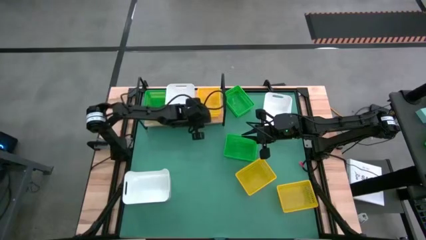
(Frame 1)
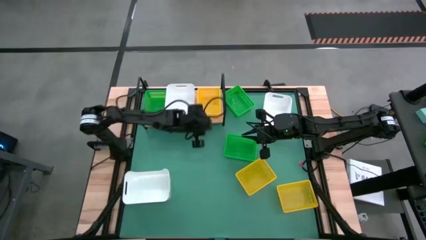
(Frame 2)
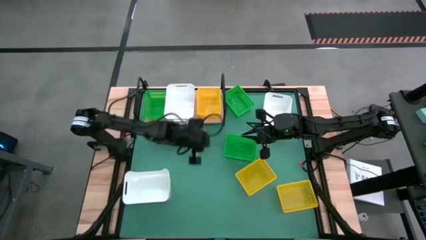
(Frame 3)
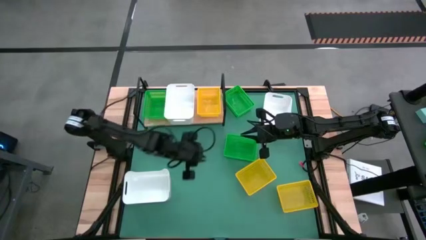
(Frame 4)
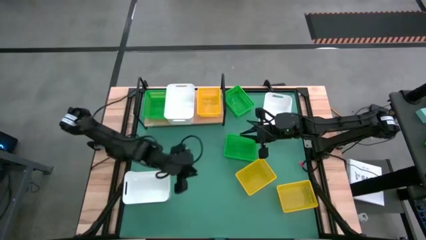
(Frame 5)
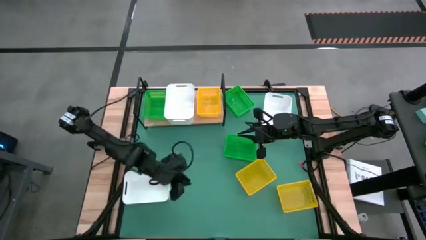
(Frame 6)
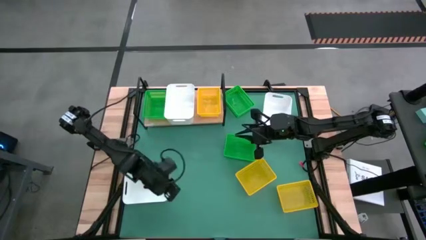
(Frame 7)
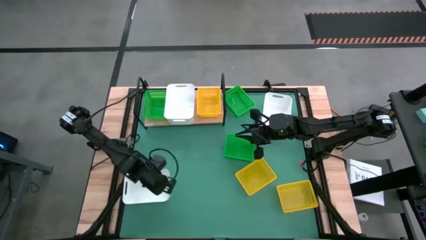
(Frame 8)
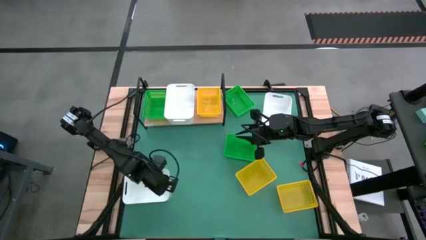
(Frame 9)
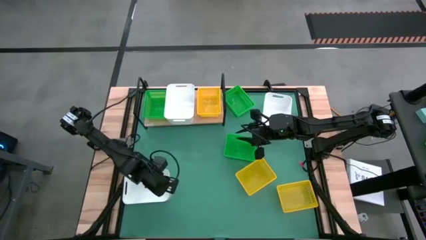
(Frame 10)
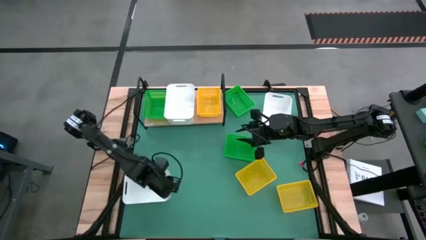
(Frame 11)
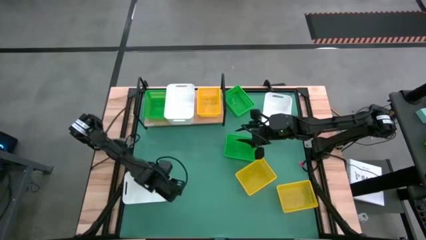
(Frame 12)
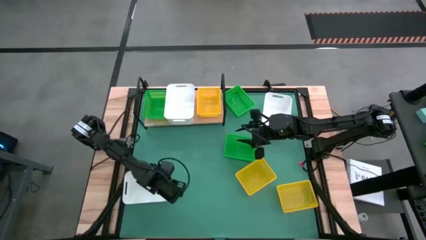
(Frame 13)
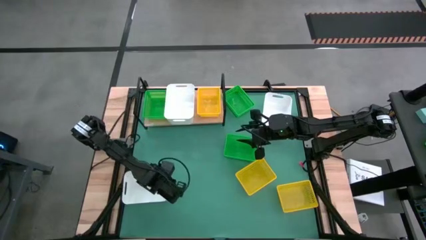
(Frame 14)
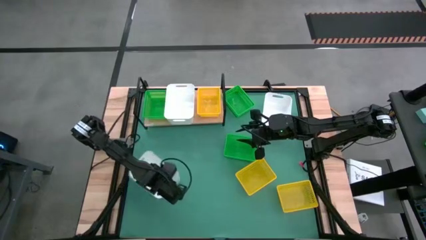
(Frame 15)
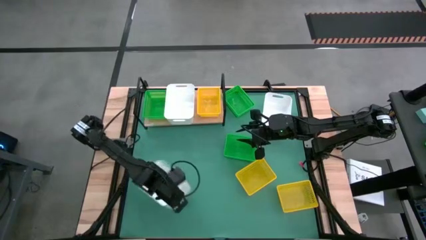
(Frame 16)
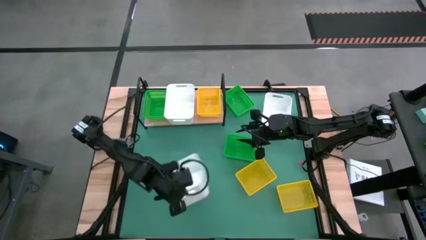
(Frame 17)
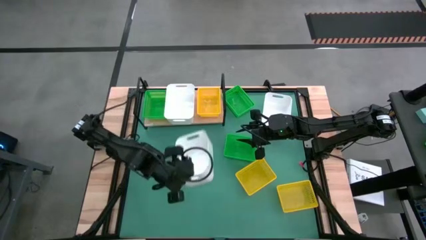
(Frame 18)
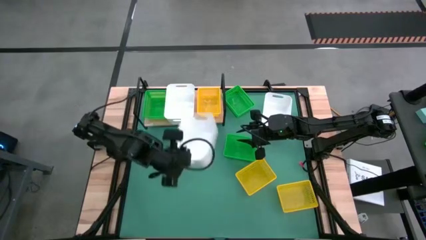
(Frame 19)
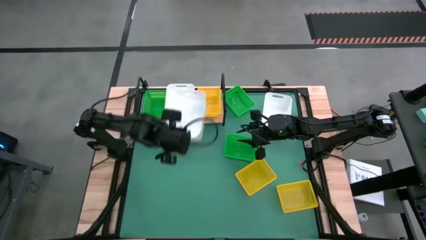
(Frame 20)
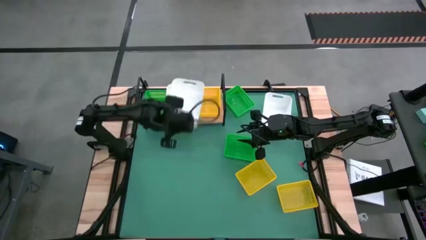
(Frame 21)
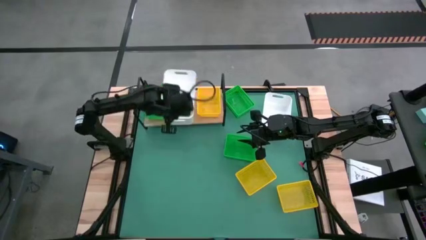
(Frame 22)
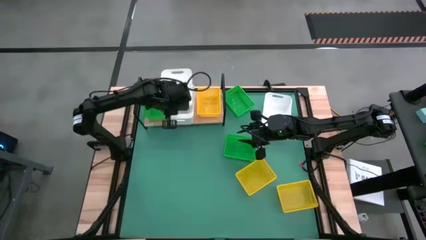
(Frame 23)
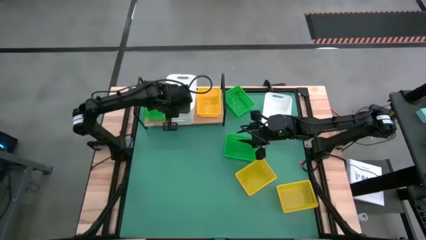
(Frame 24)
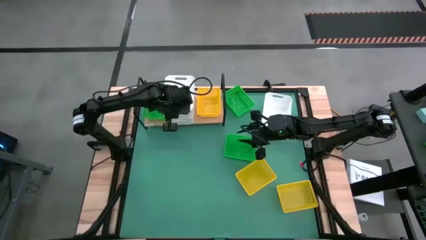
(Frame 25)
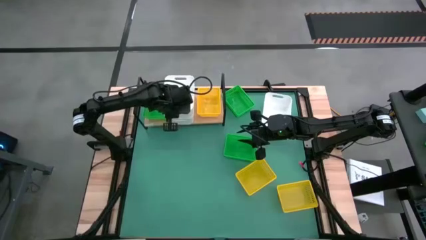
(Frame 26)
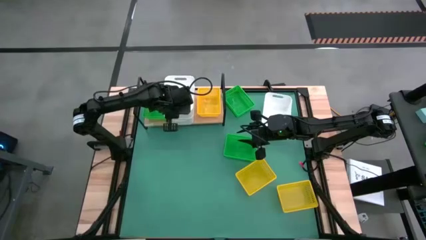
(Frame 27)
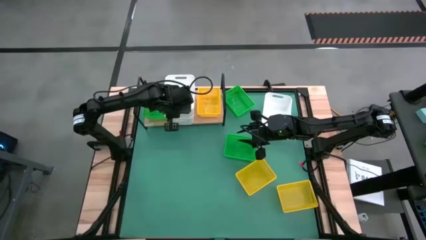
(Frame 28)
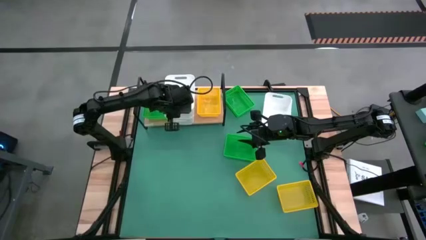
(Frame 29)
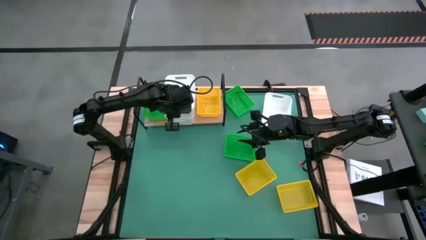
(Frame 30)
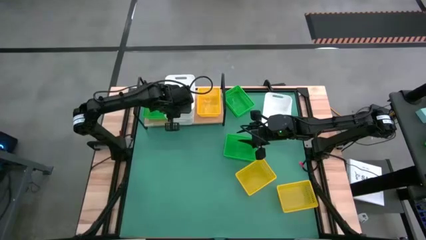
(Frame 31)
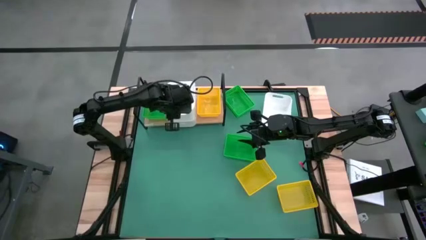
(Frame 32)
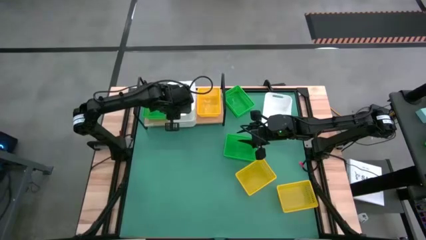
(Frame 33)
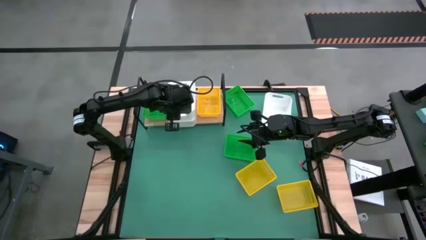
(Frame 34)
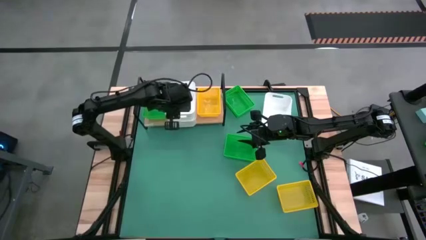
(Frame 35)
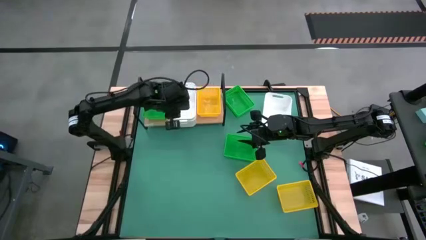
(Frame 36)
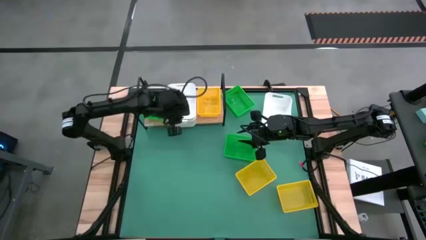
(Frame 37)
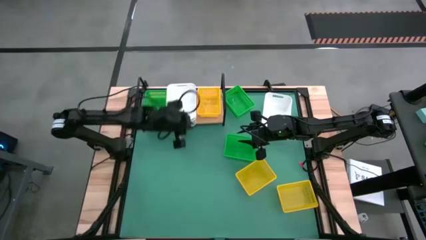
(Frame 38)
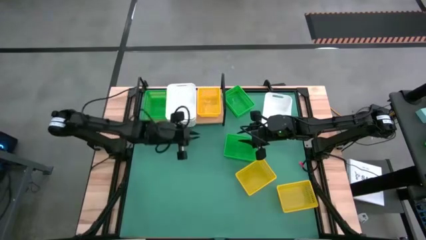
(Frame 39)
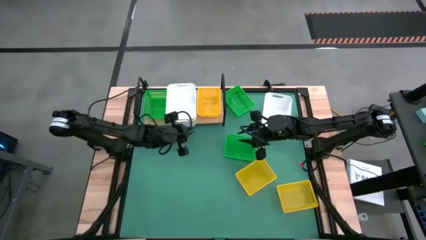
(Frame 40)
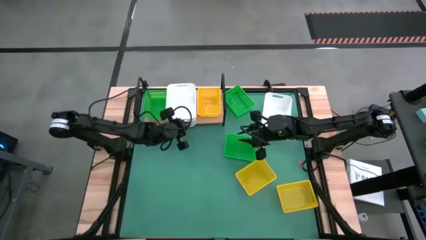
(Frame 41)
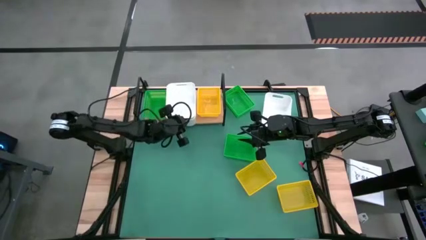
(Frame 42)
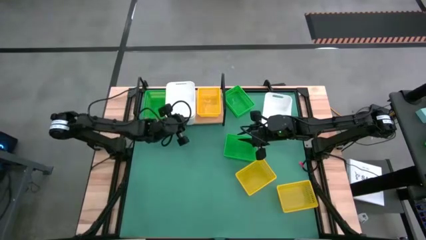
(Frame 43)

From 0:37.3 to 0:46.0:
Task: Stack baskets on shelf by color
Stack the bottom white bin on top of the white bin on the shelf

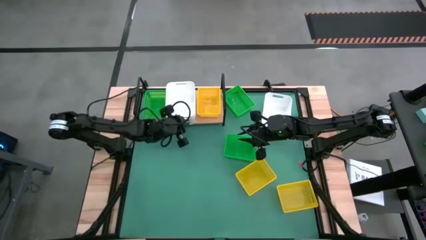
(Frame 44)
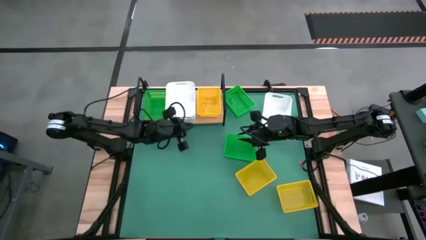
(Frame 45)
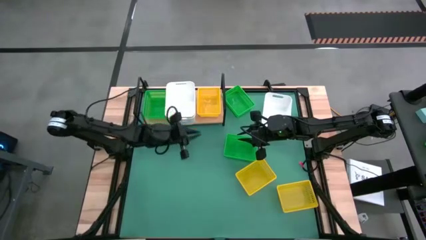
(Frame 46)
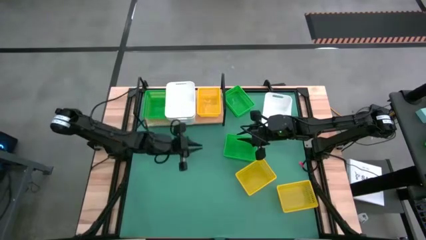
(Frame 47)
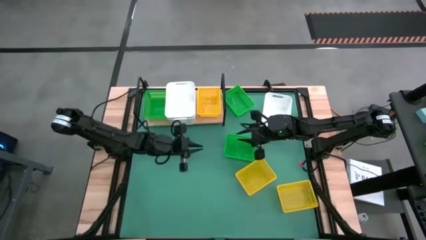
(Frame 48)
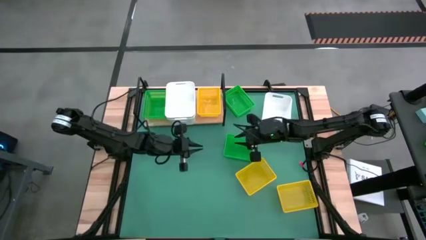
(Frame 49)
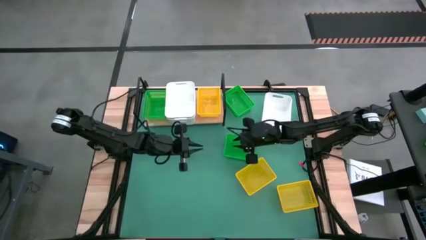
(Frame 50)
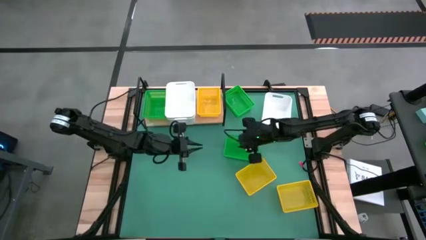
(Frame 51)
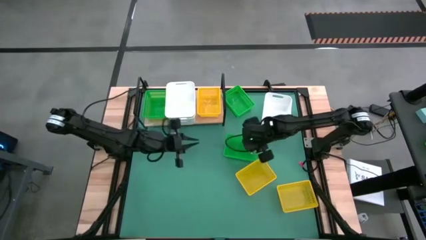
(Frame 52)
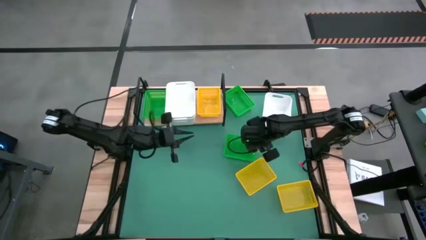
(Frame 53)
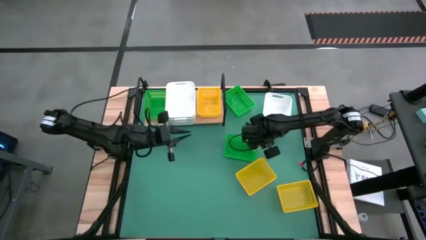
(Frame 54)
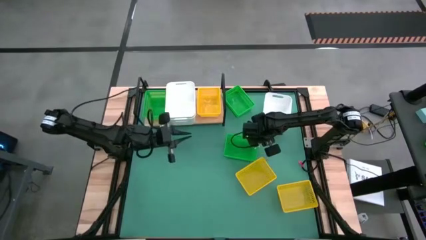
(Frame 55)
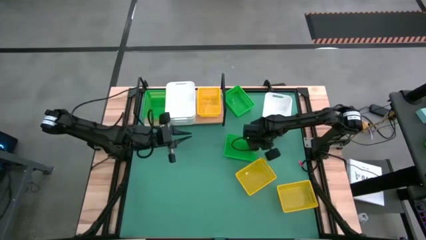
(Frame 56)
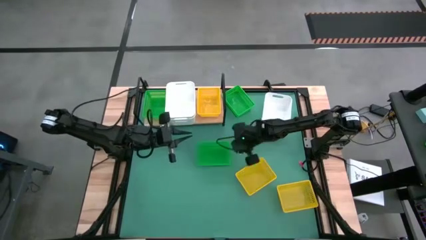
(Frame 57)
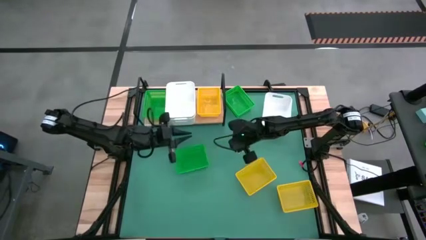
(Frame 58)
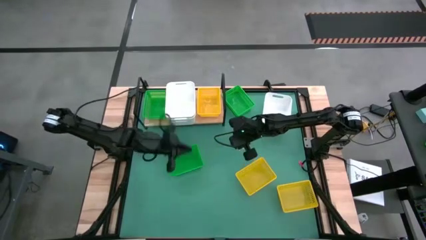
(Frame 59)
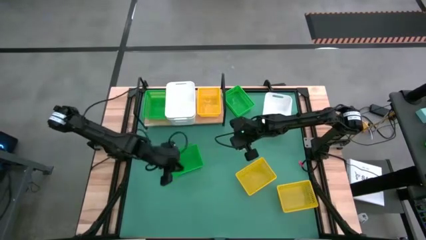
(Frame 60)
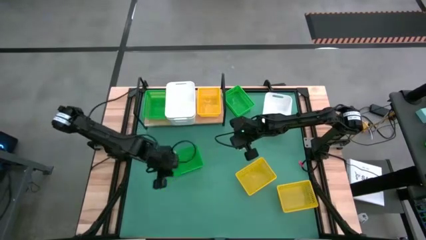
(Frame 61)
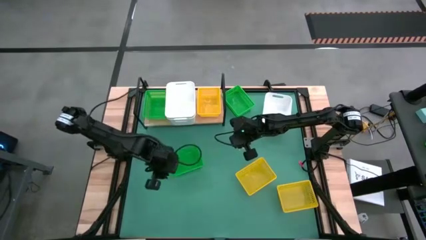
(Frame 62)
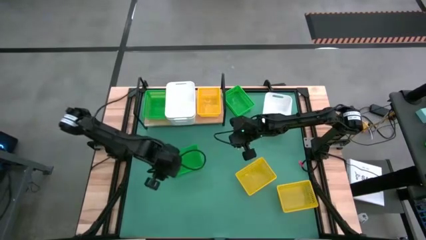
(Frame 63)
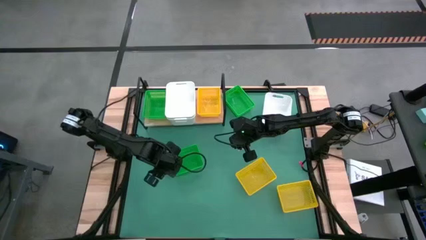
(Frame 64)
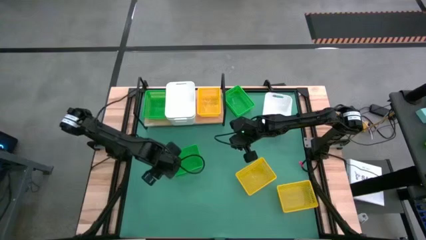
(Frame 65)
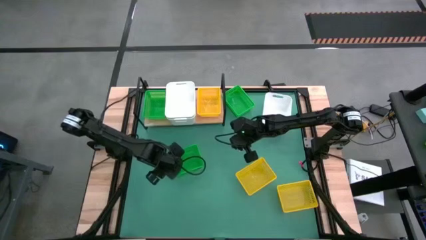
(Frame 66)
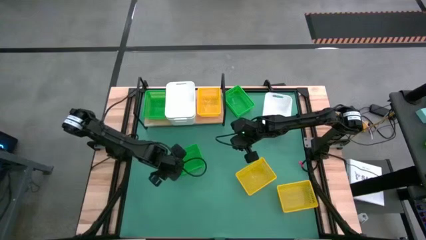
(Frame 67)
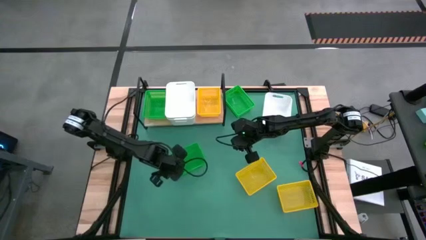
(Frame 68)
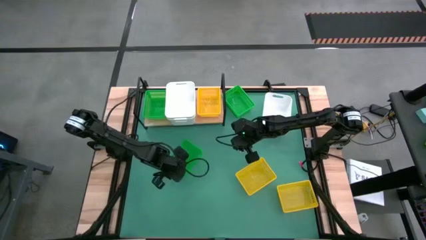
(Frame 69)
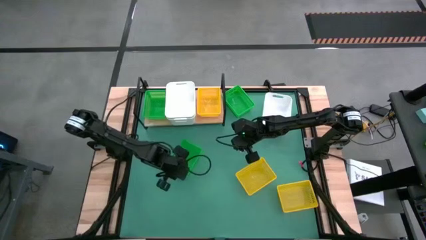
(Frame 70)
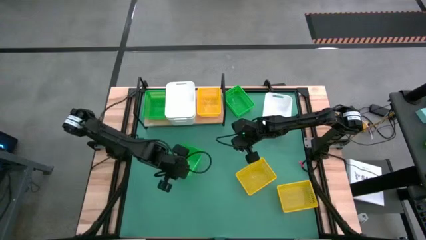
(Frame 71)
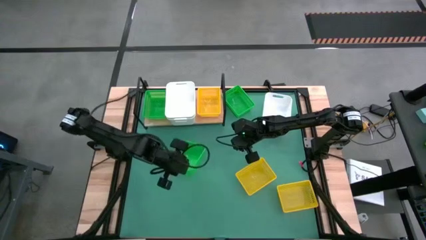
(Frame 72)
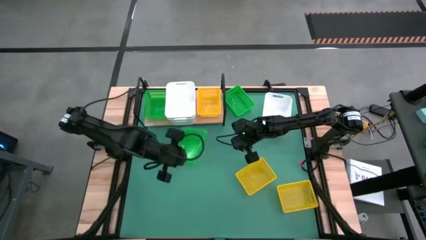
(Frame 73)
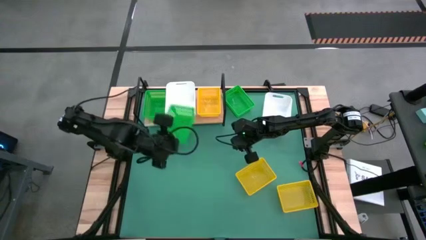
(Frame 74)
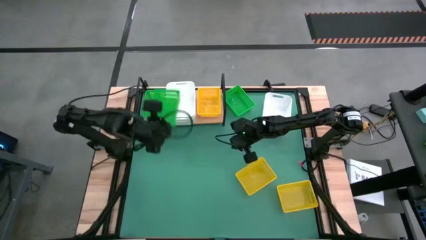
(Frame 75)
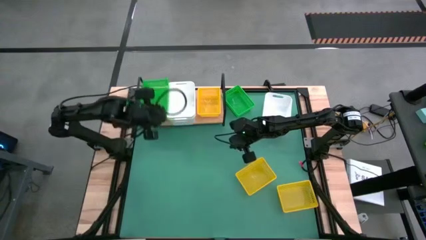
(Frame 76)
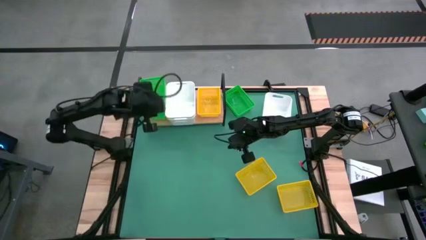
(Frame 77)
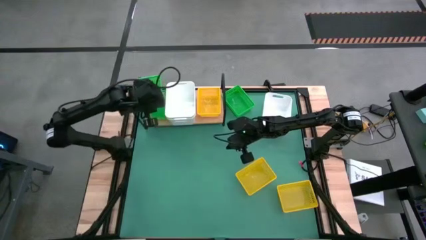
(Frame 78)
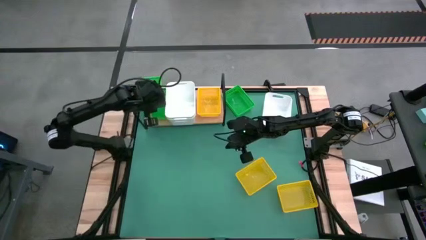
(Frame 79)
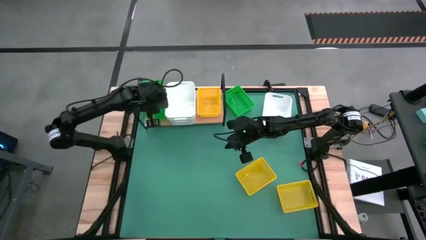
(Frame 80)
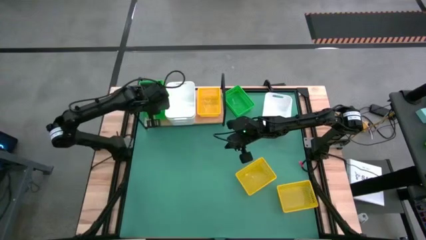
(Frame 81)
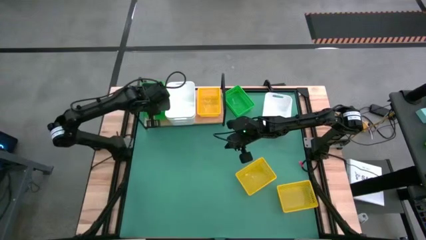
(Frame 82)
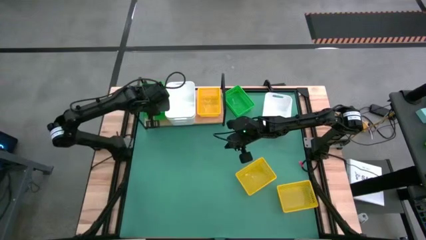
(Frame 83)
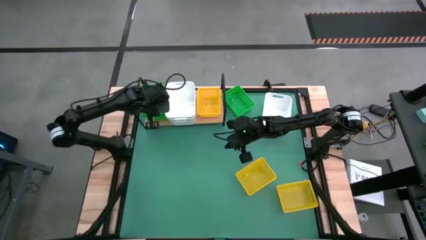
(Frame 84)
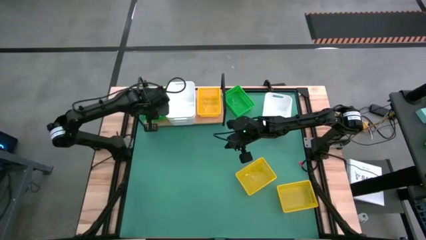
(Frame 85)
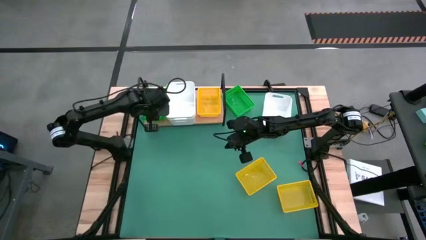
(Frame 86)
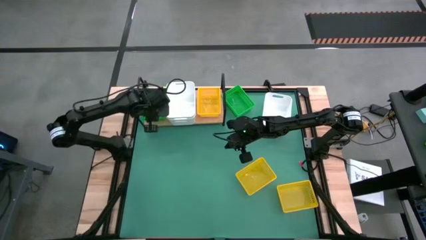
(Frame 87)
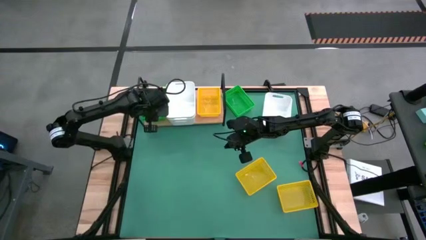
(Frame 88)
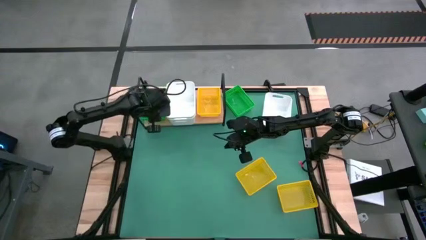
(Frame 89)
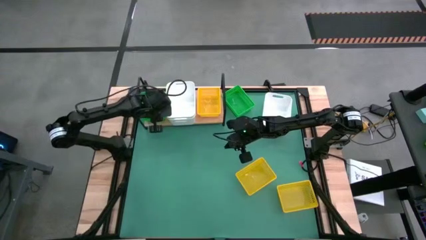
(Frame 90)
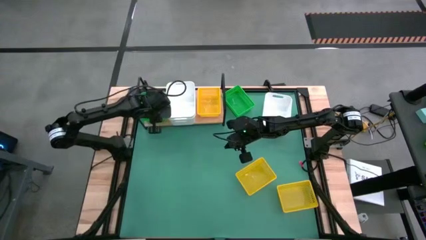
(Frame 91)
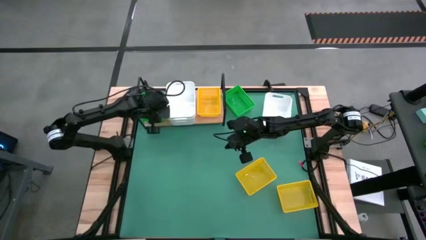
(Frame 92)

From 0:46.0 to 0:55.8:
Stack the bottom green bin on top of the green bin on the shelf
